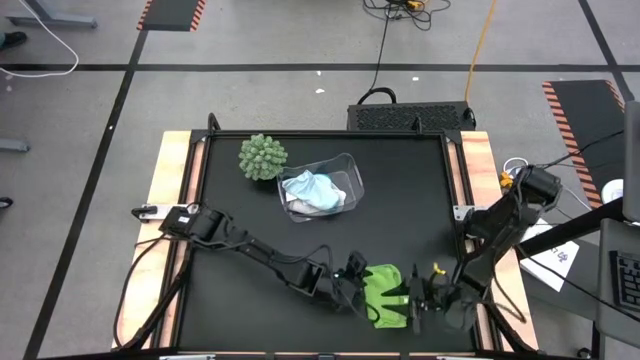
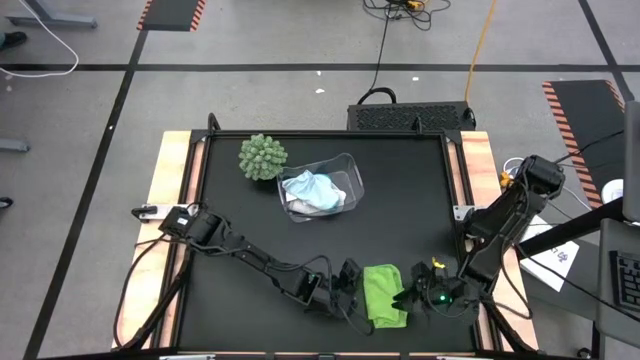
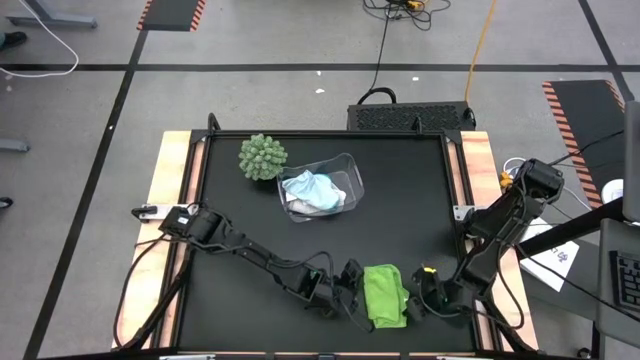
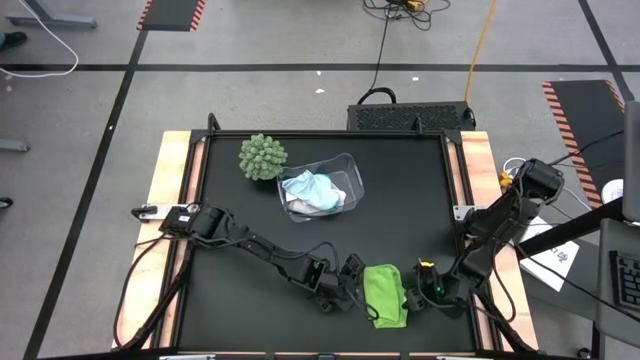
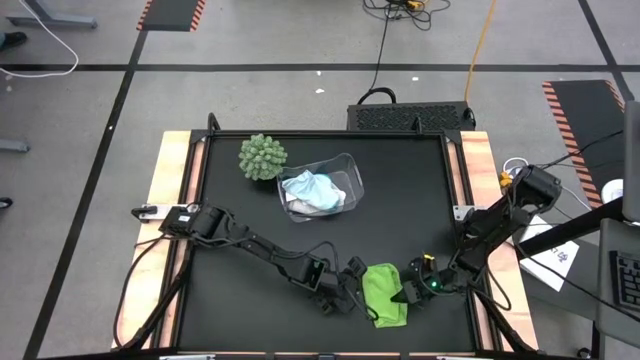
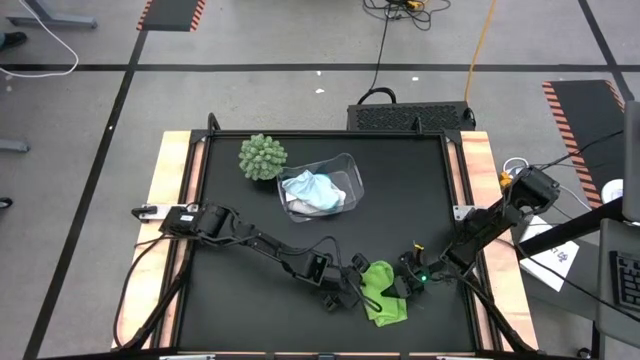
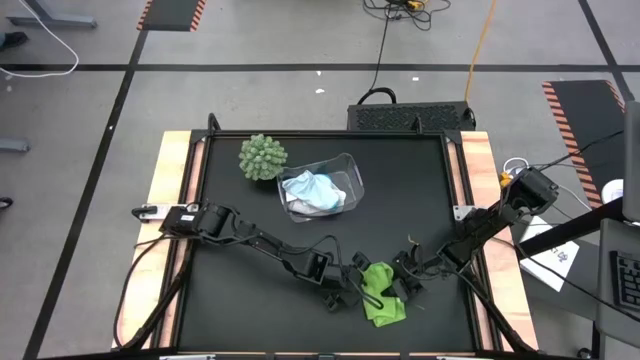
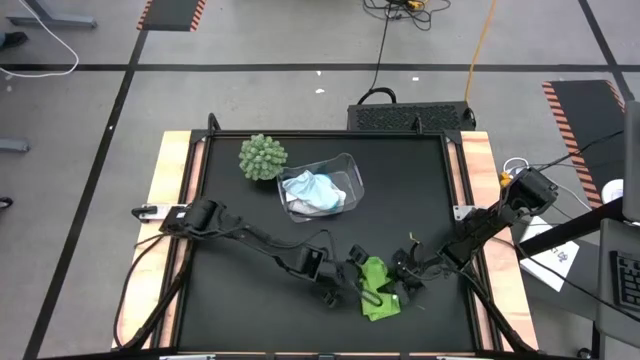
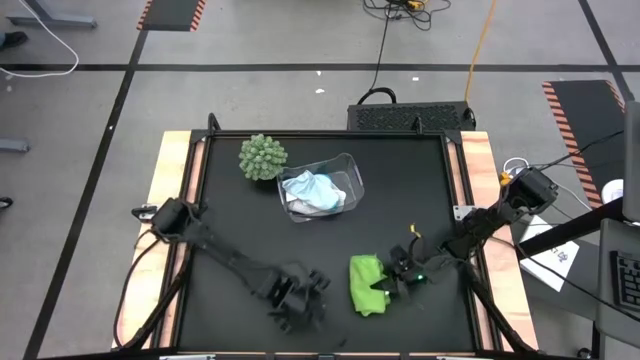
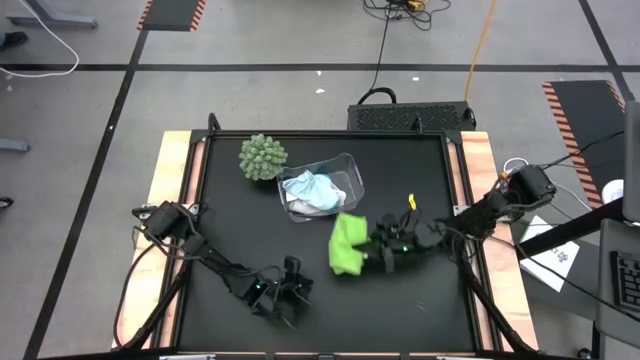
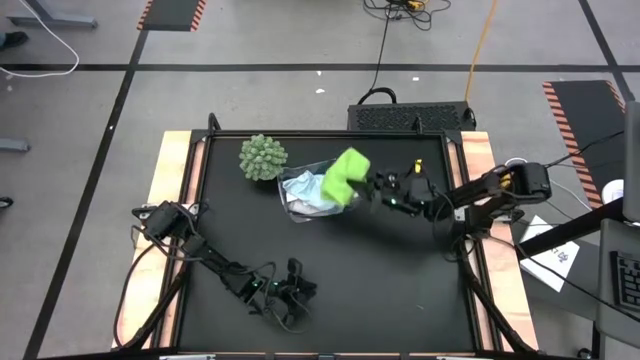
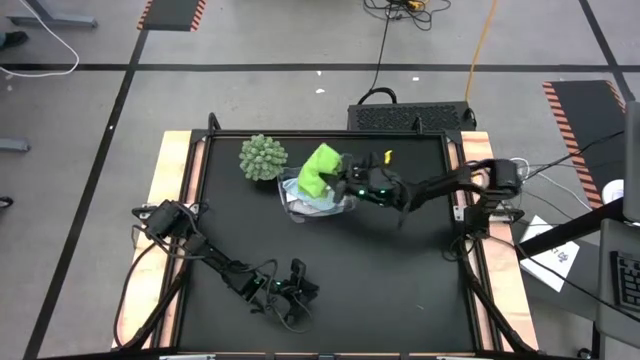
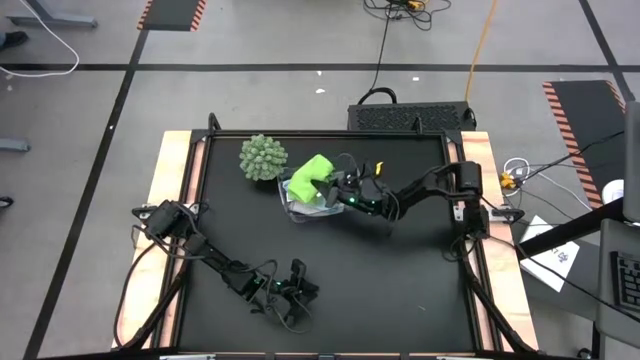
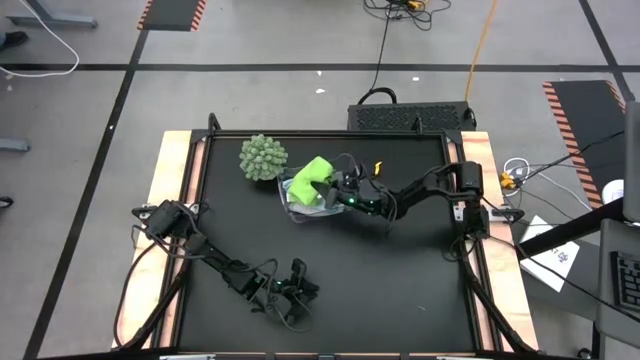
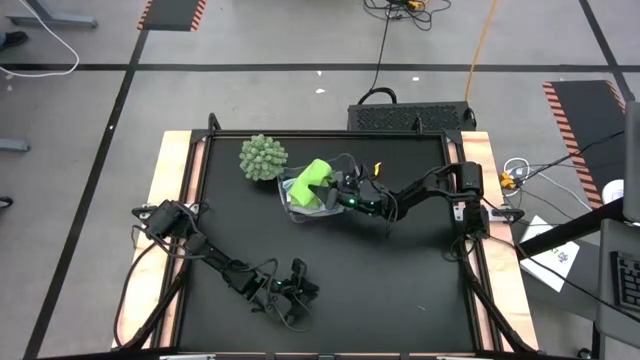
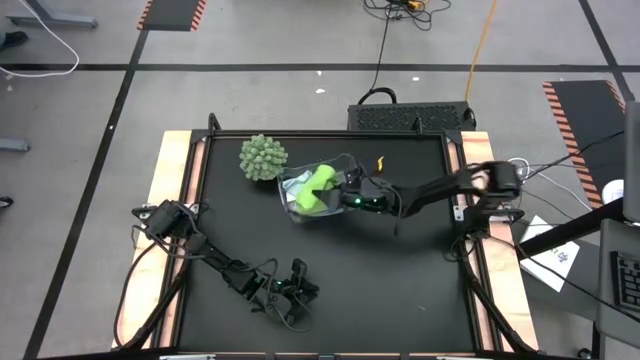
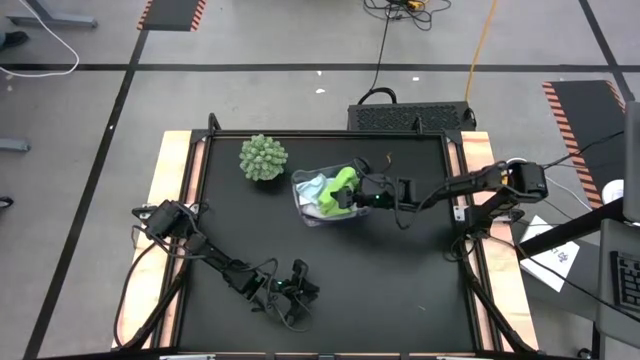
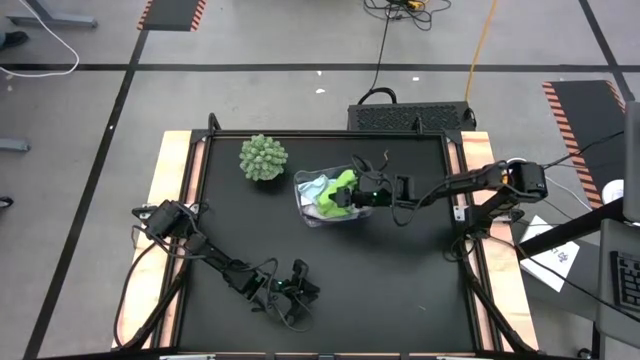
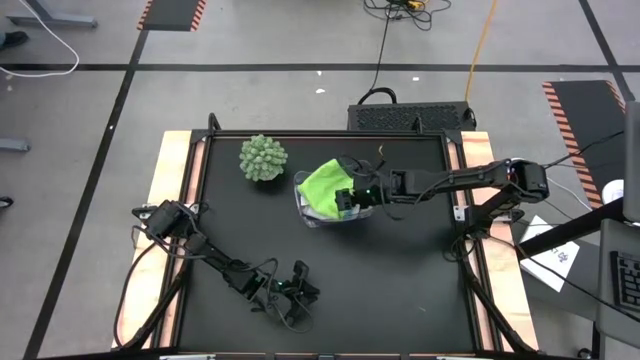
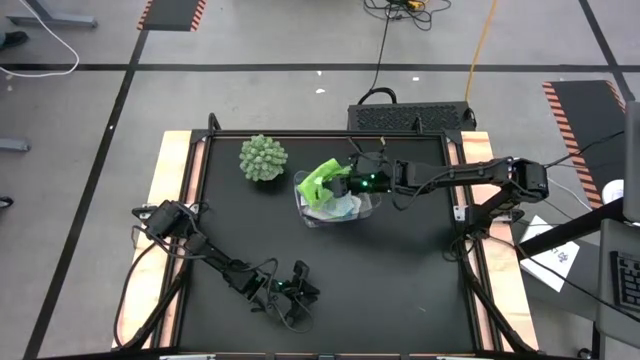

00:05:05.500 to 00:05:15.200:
Task: Fold microfiber towels
Put the folded green towel into the transparent bin

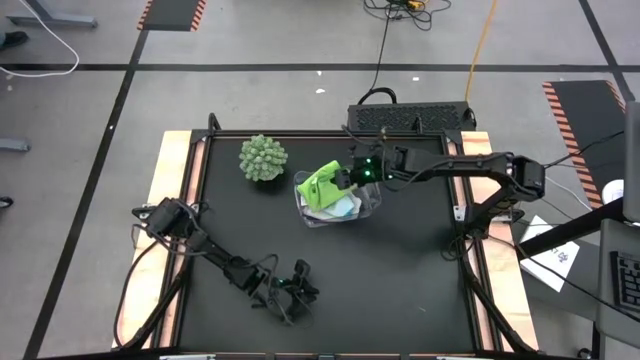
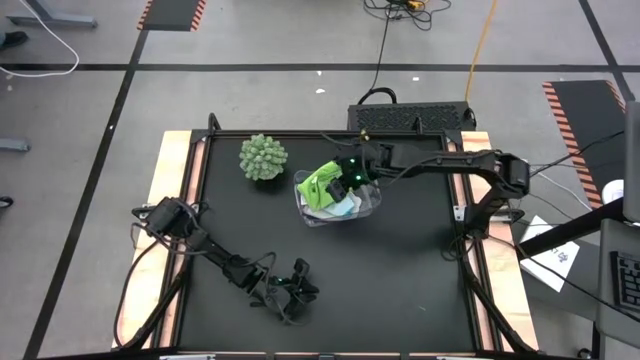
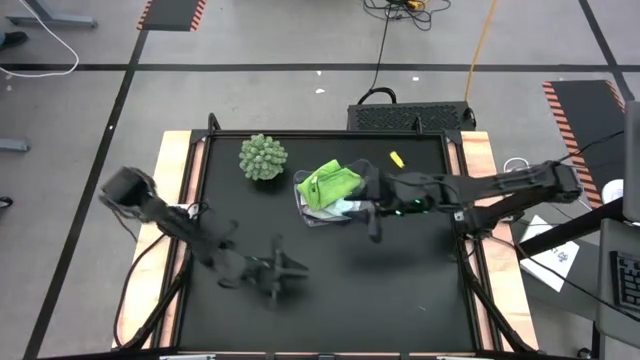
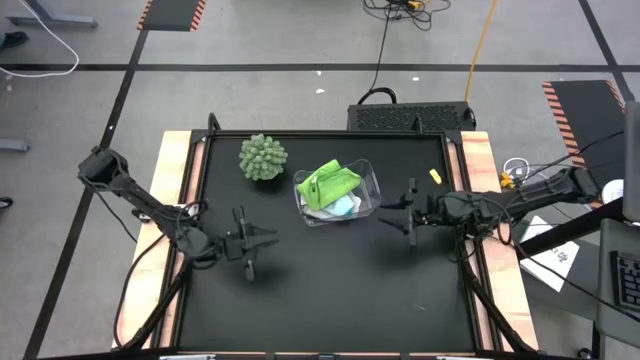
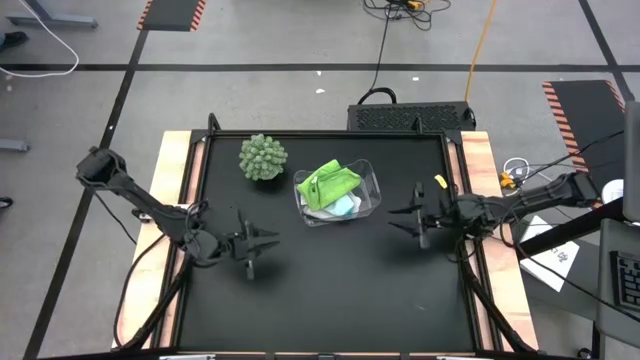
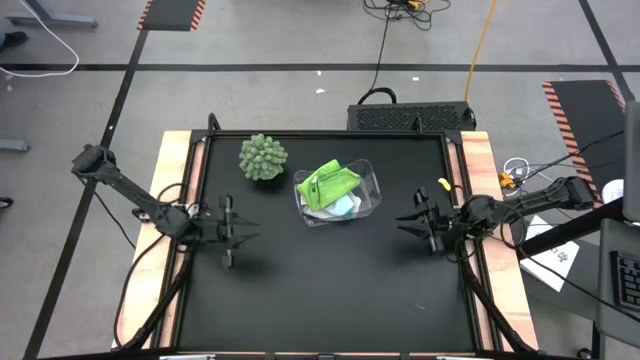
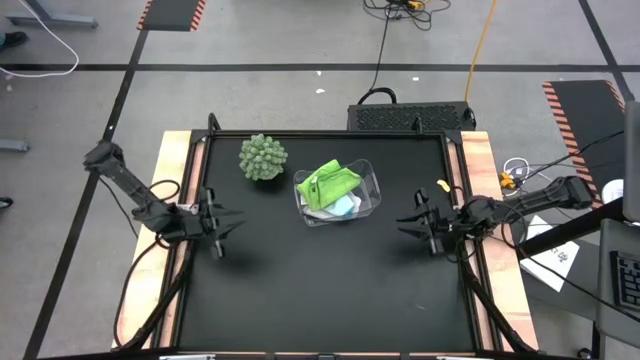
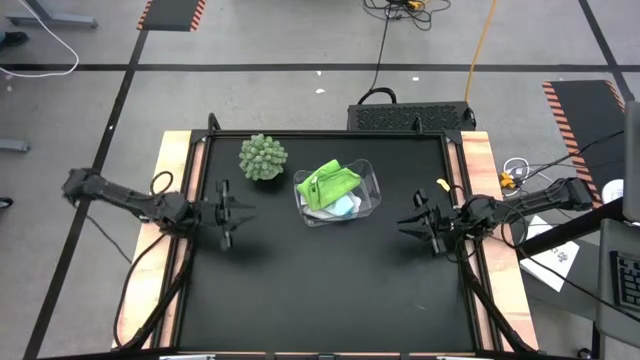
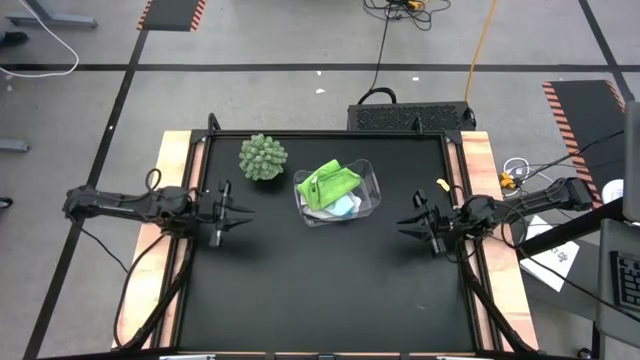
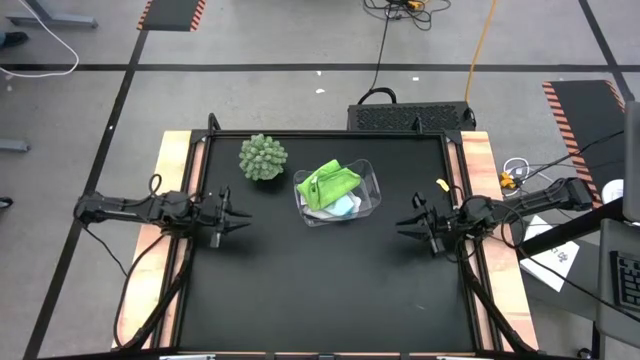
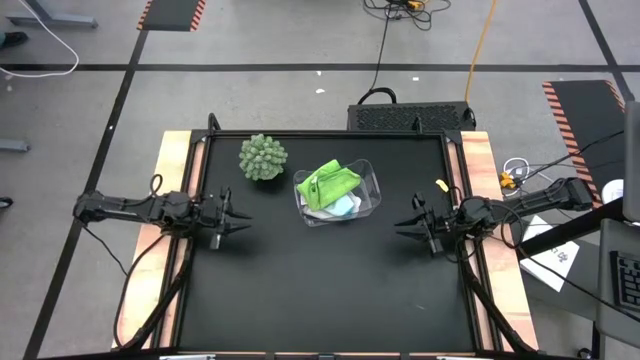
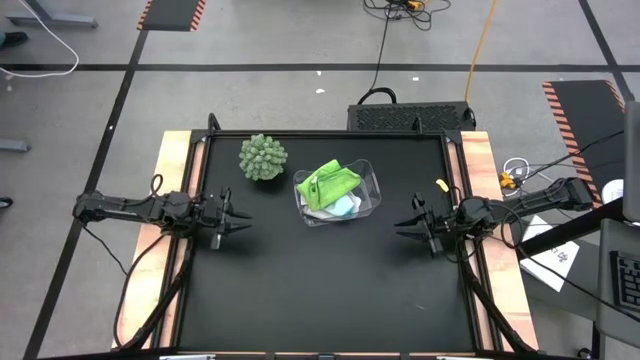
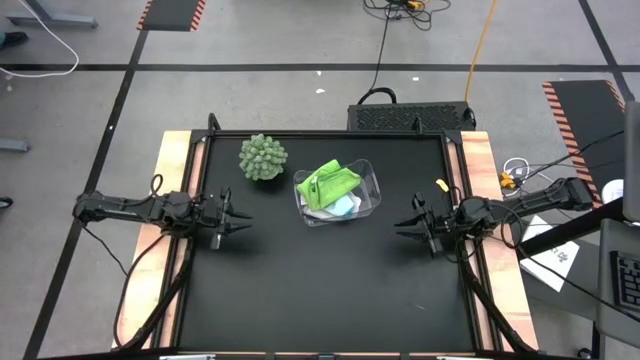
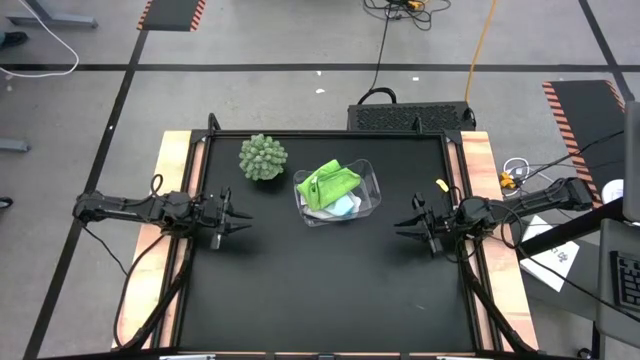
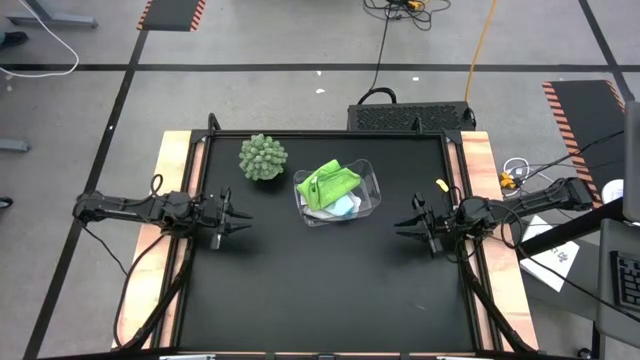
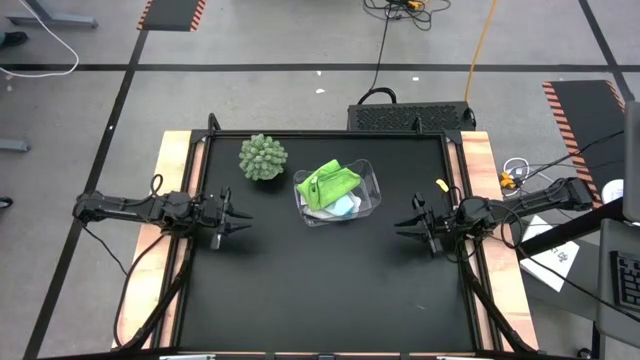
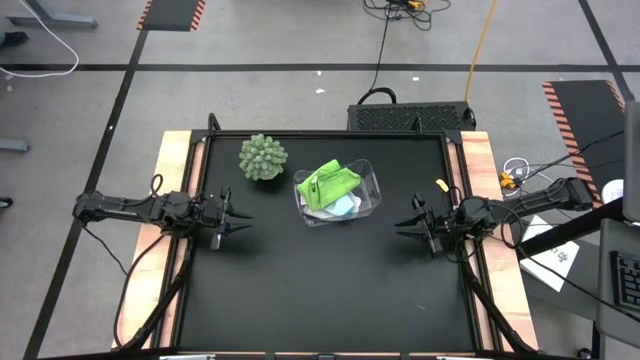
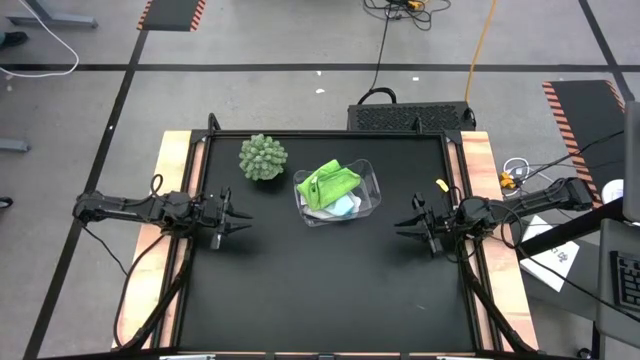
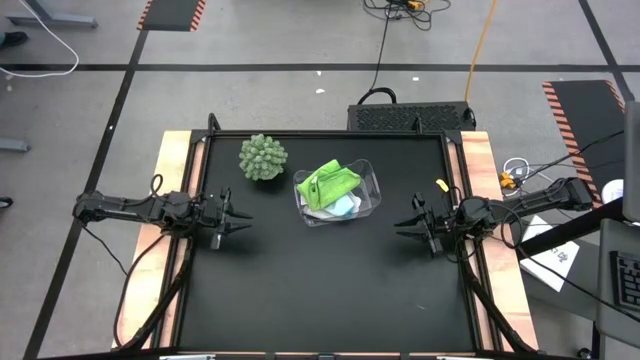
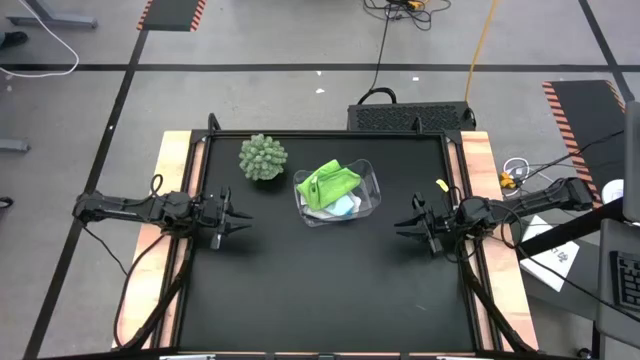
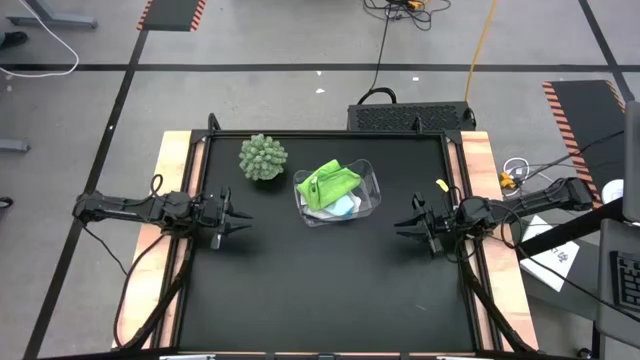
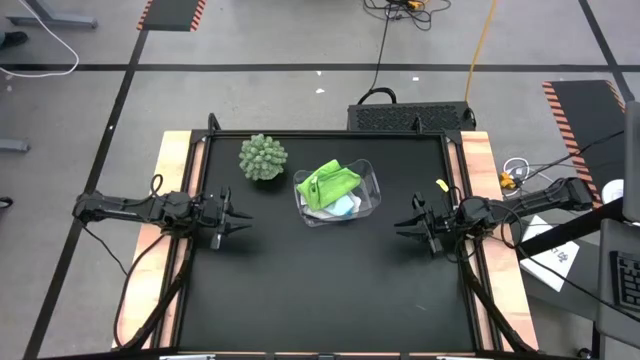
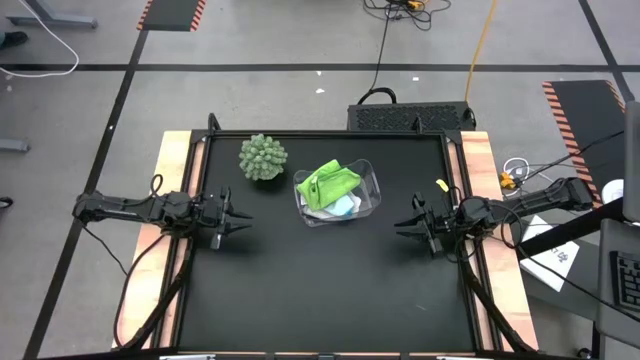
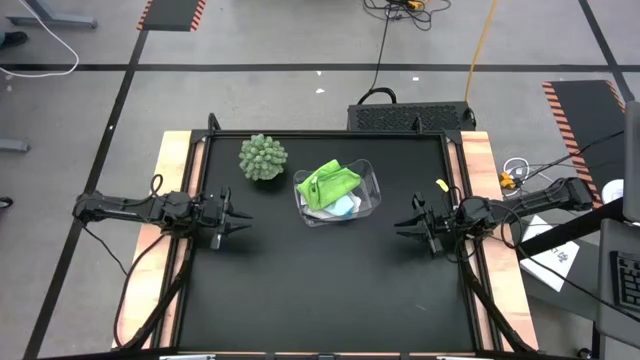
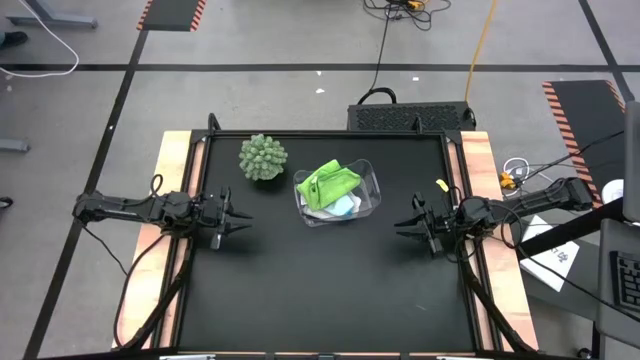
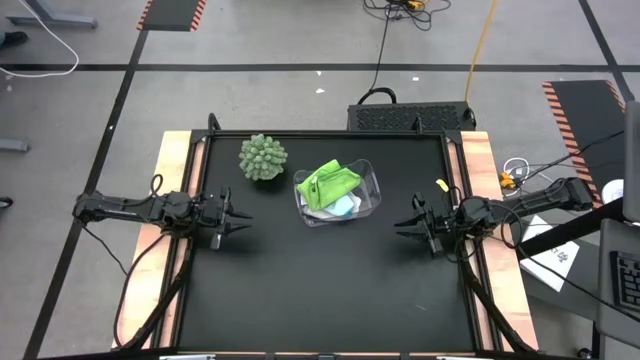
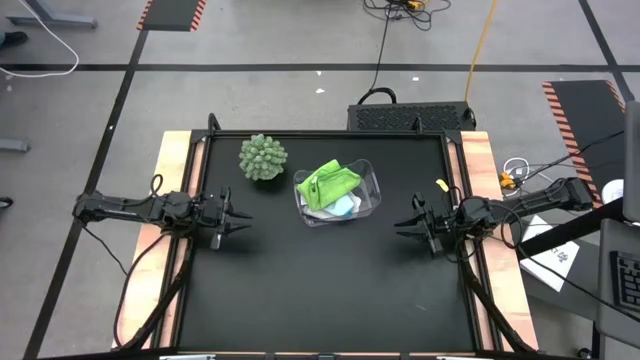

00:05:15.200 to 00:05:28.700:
Return to Home Position
